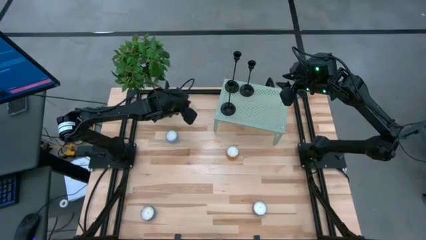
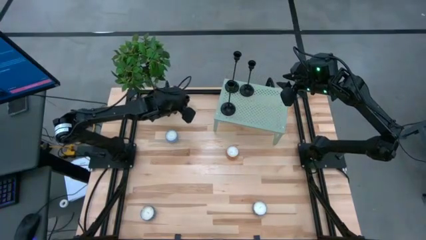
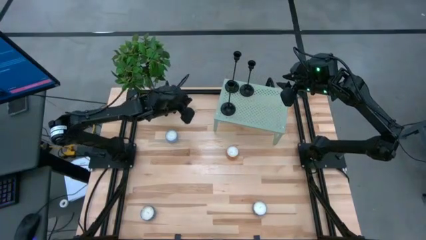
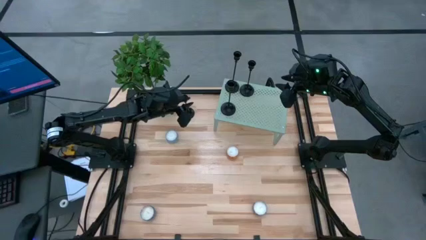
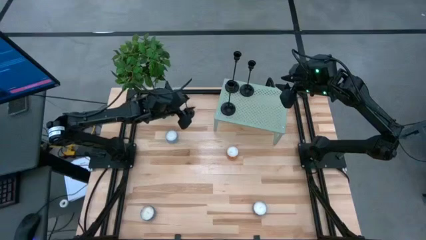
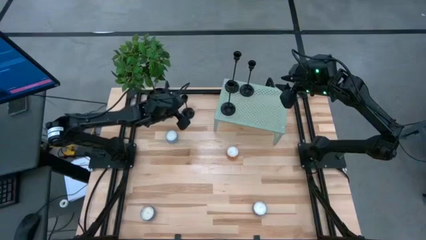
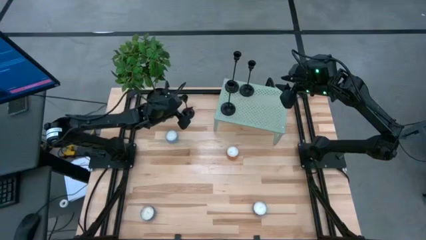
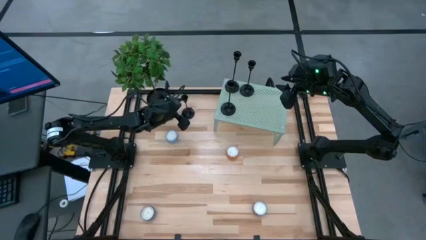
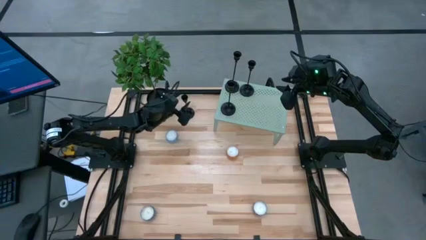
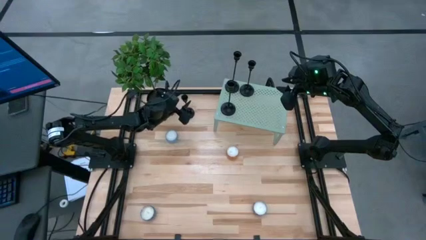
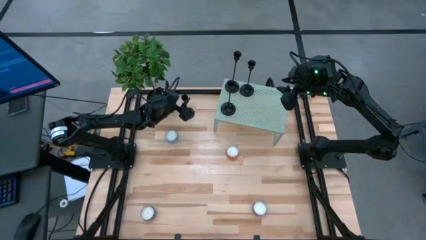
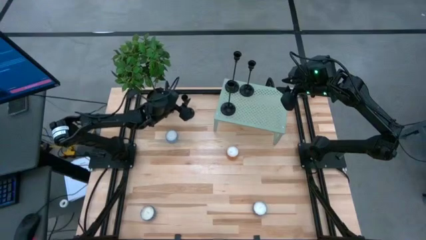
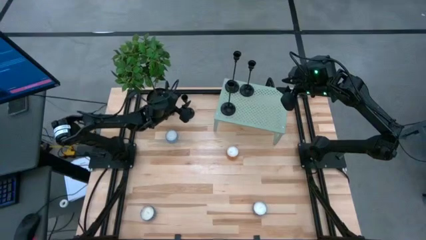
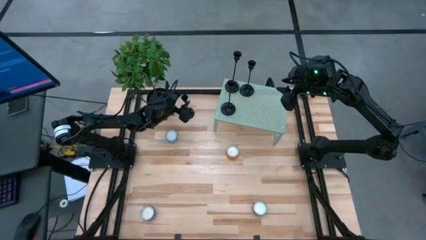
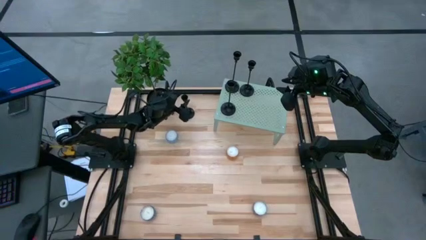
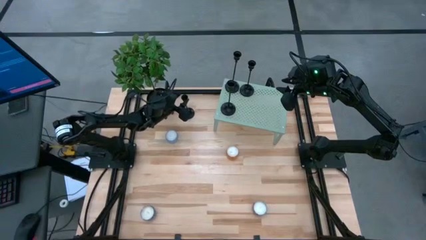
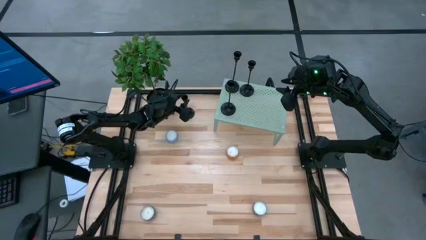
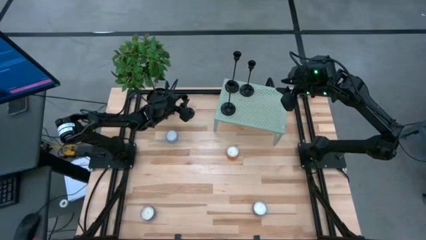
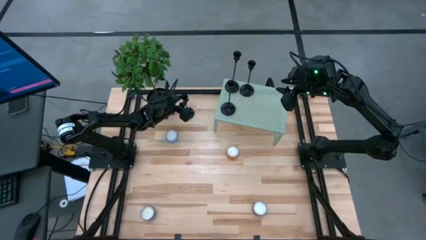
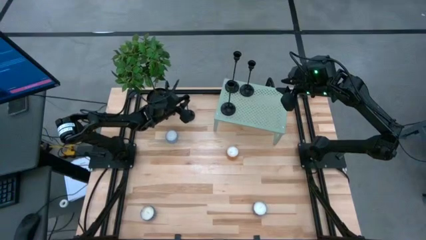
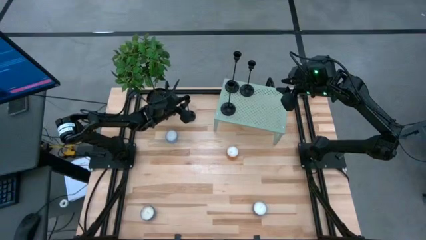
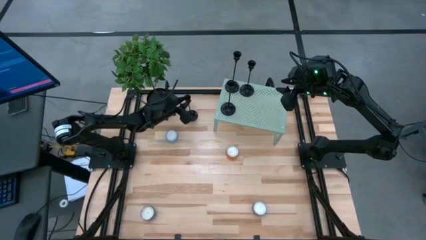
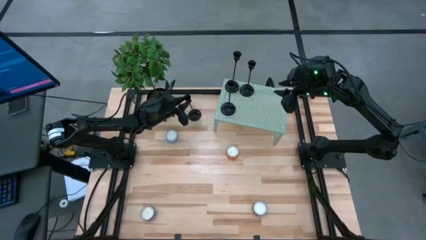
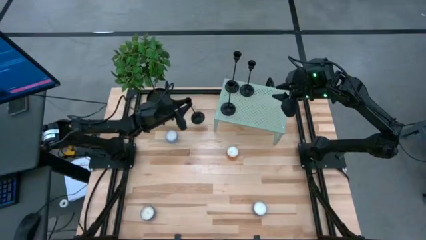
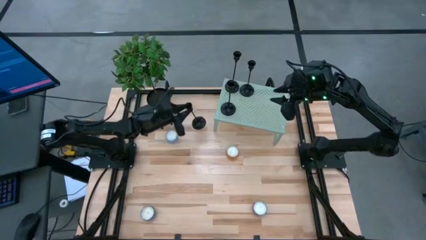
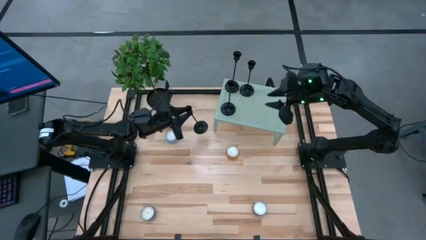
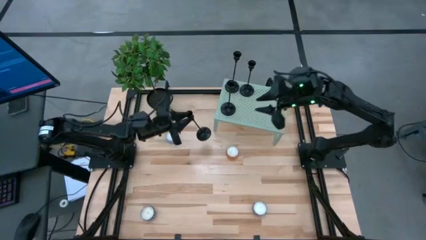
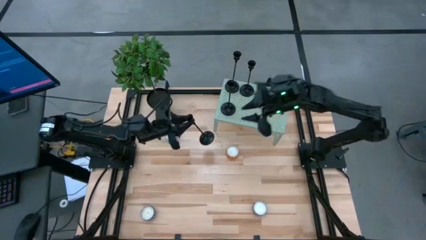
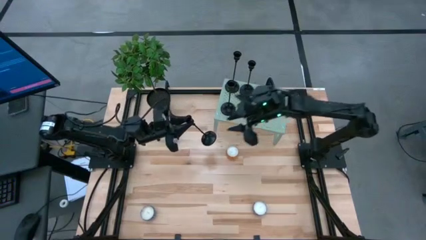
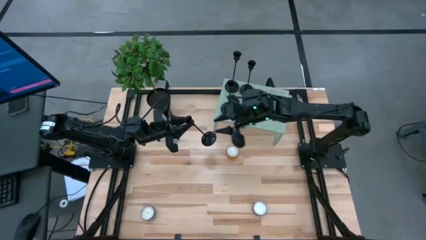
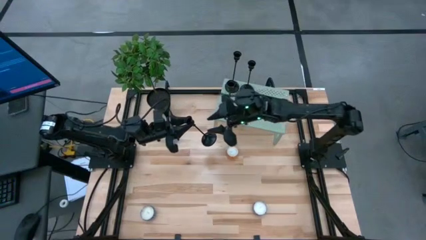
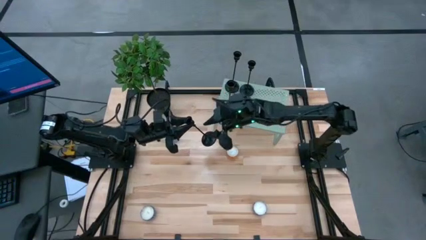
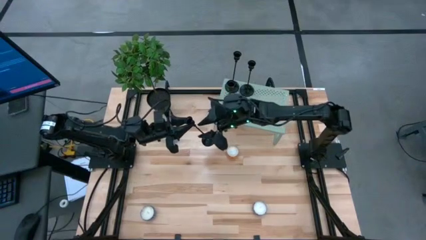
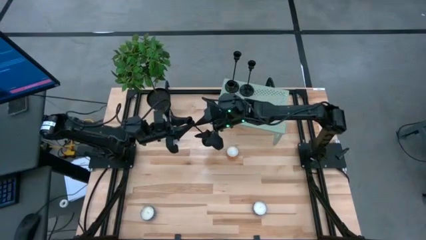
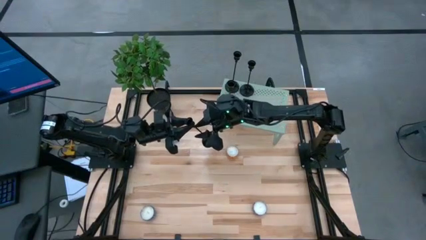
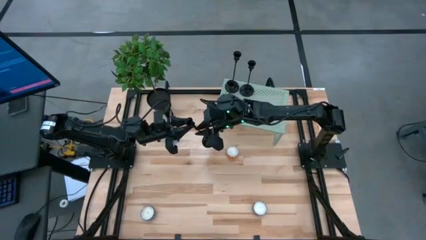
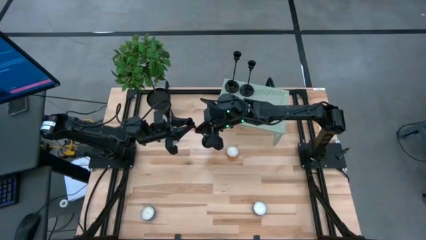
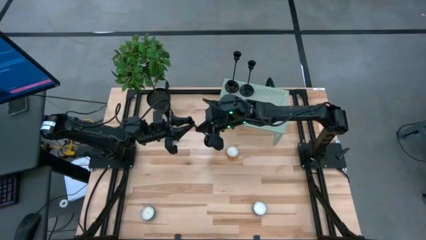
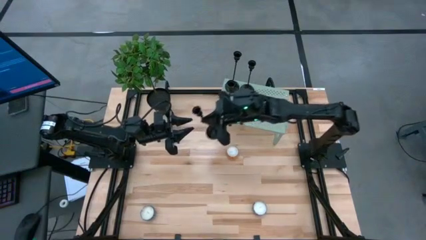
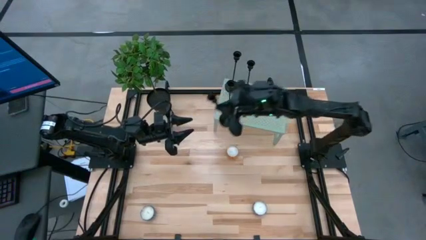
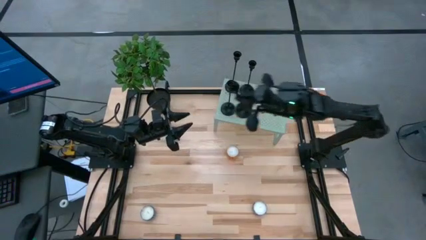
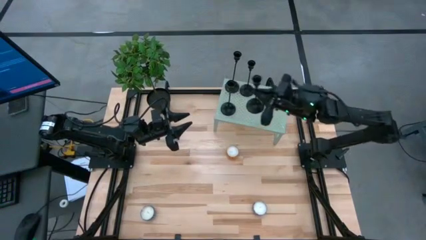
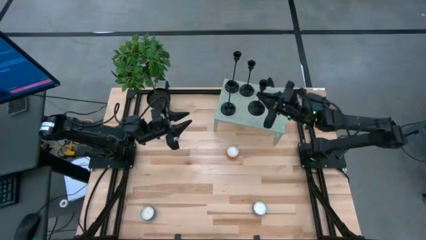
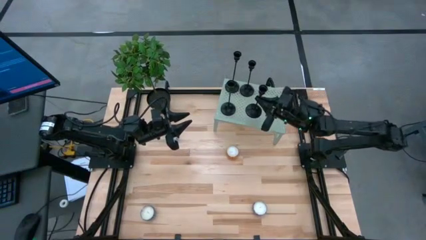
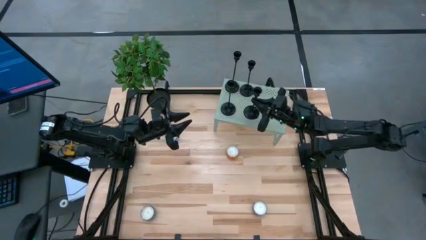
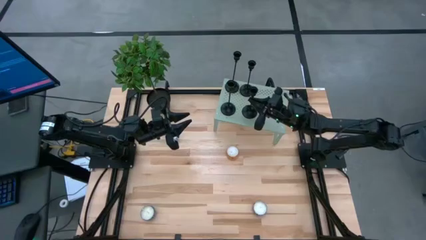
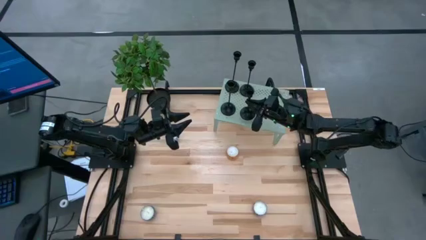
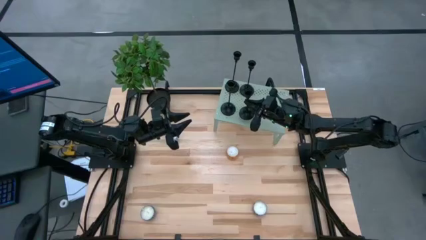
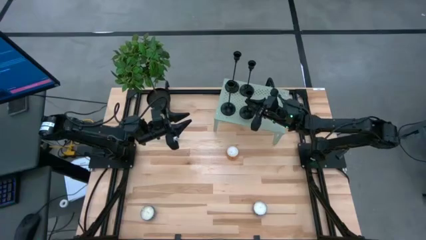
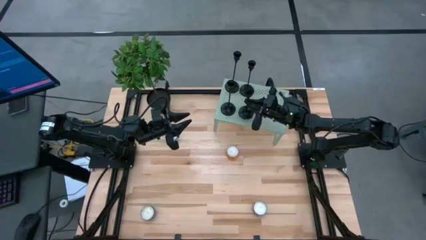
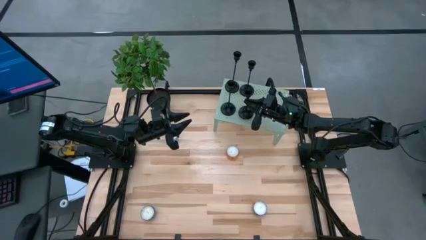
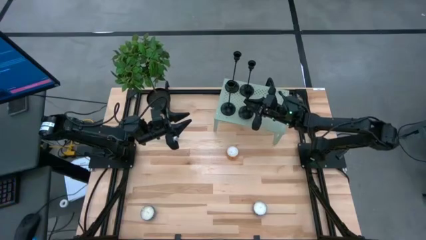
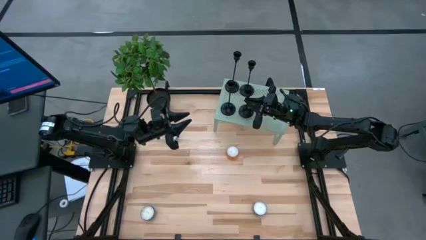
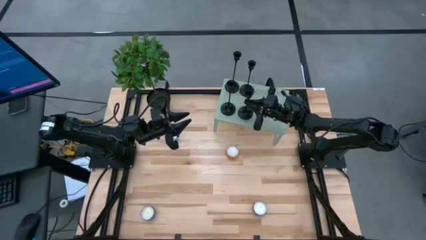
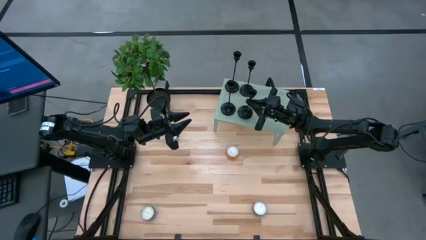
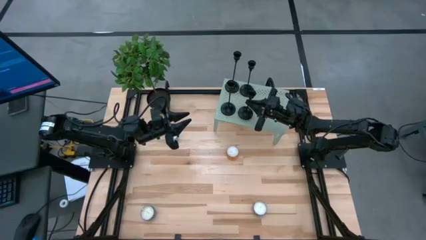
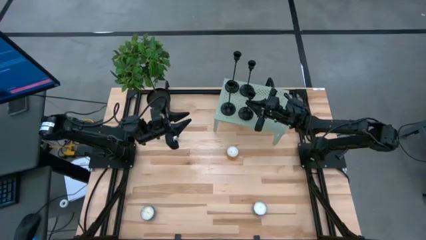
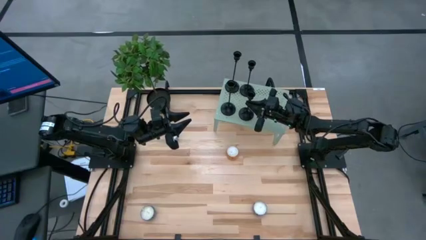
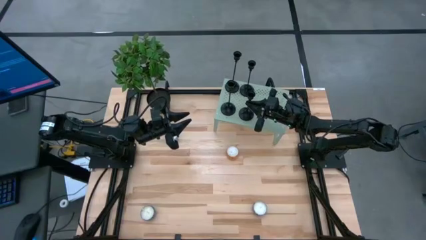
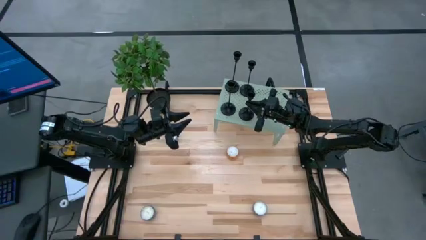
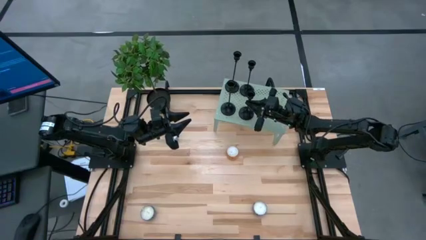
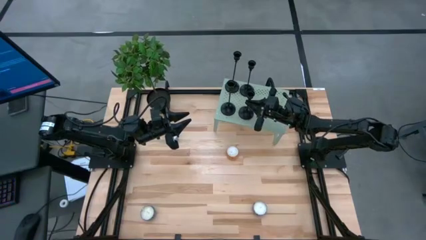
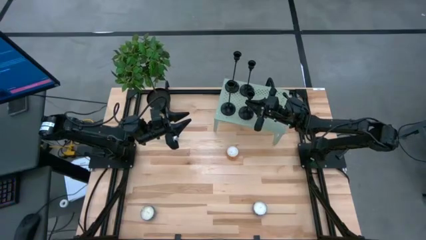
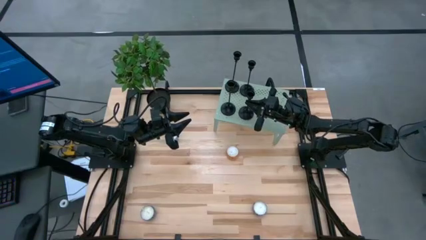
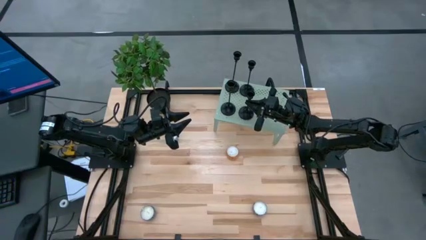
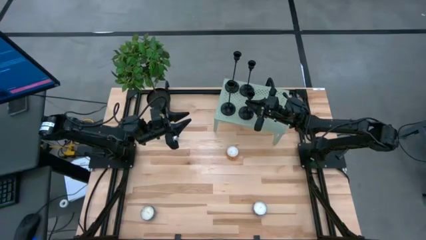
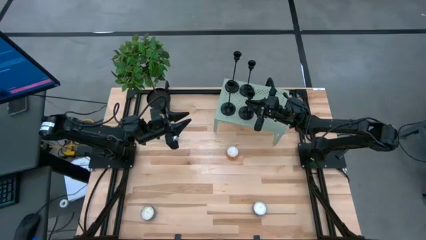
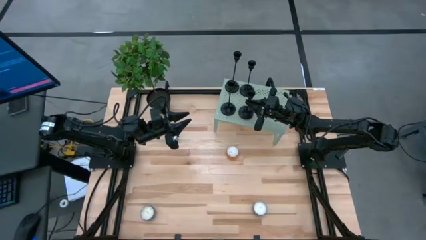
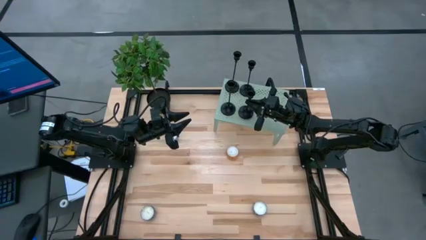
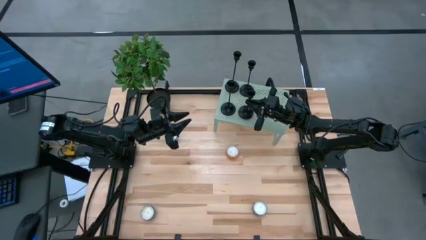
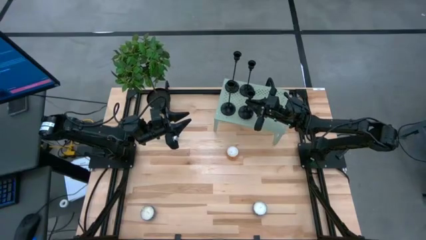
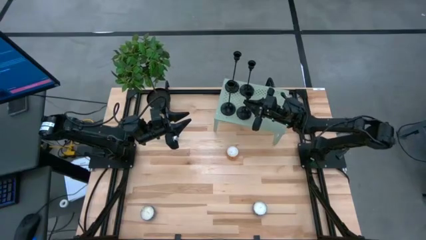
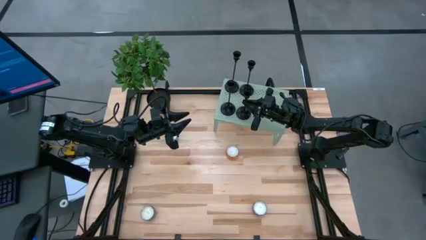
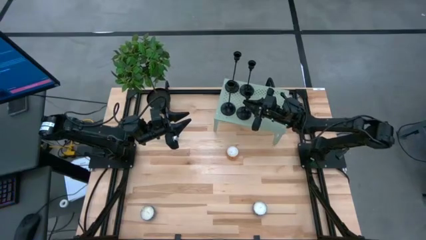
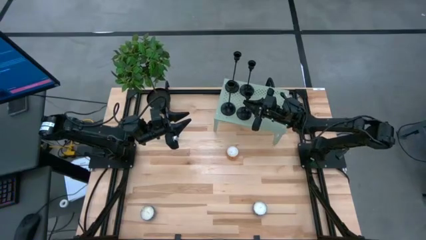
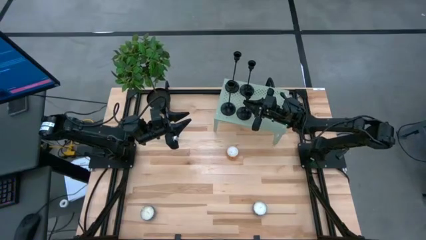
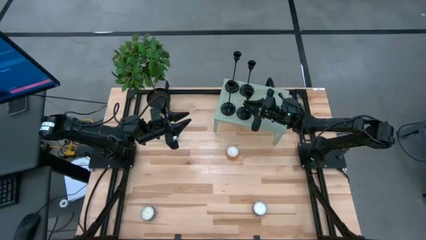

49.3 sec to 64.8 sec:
Task: Pick & Place candle stick holders
Put the candle holder on the shelf aligned with the other candle holder to the right

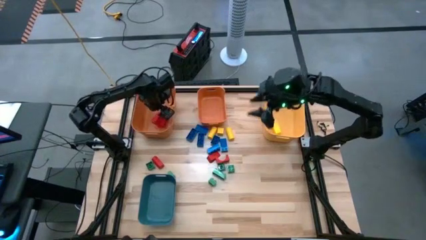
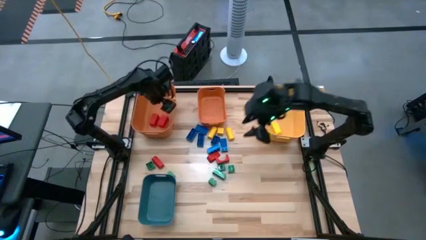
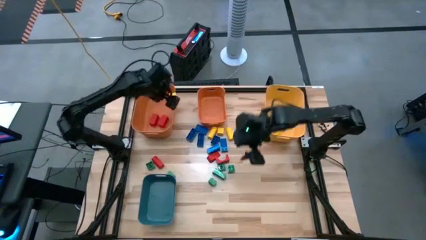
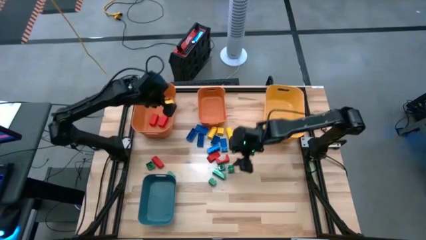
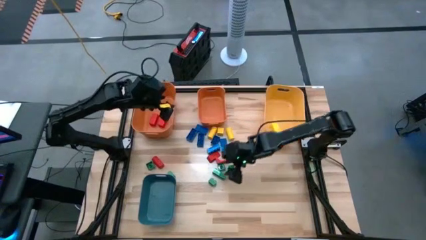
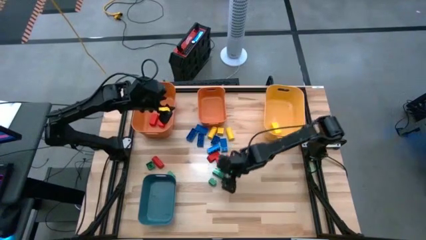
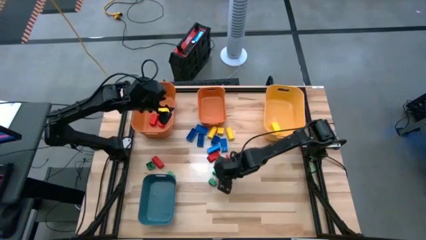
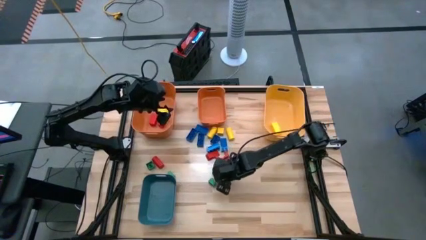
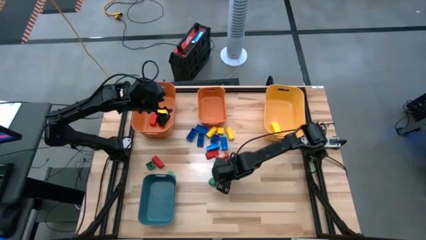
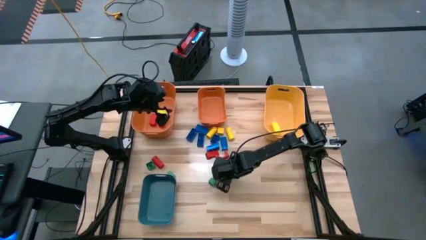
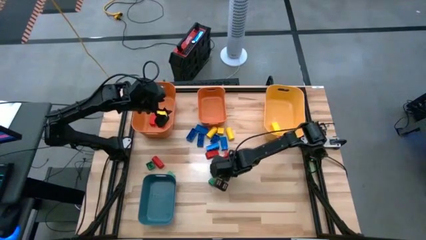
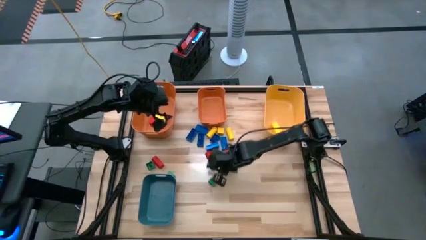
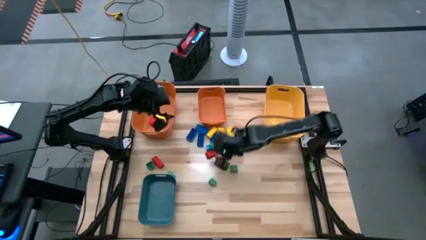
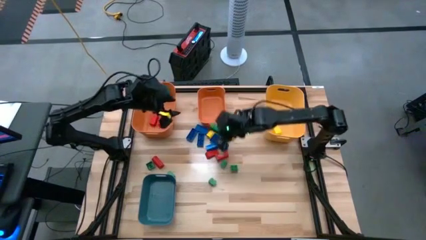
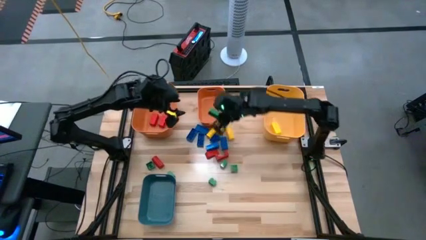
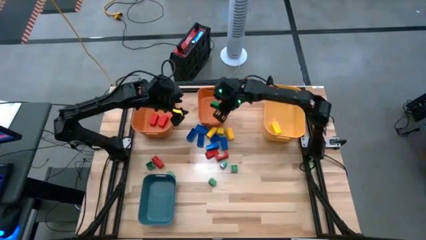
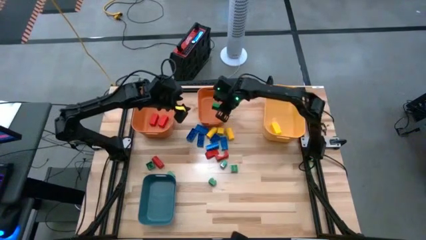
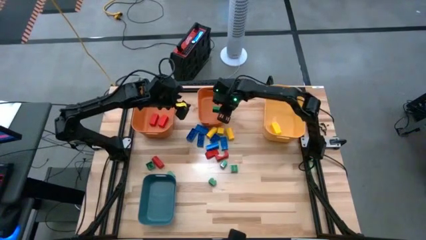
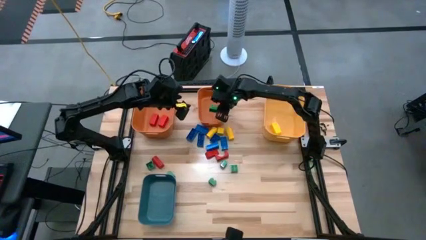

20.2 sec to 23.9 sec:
Task: Sort blocks
Put the green game piece into the right orange bin
